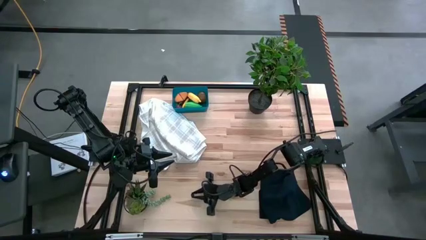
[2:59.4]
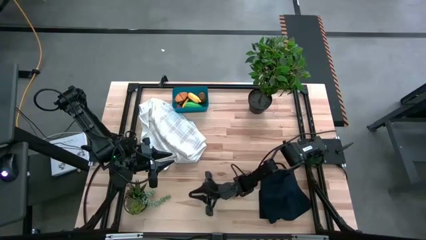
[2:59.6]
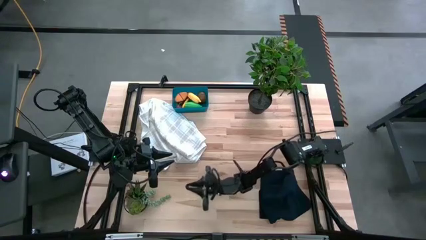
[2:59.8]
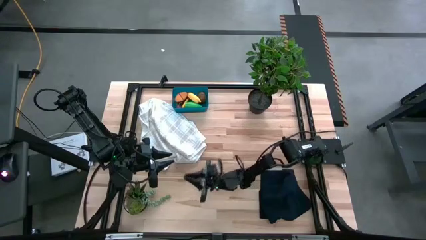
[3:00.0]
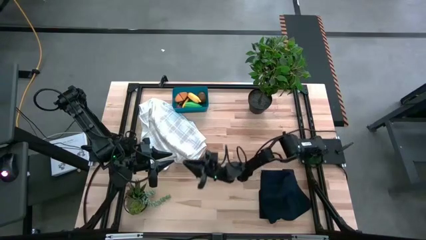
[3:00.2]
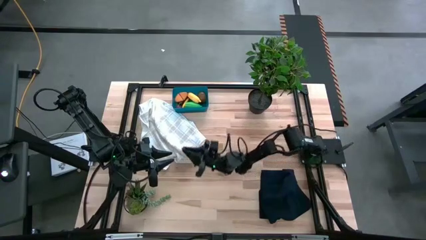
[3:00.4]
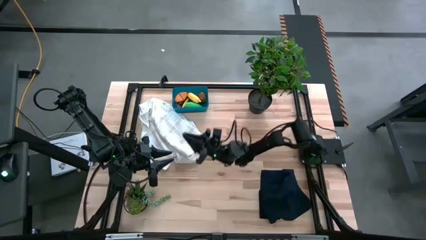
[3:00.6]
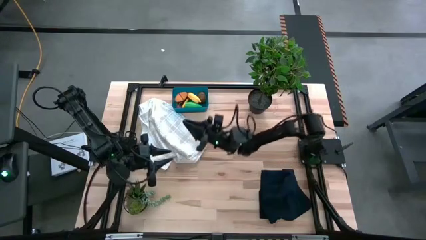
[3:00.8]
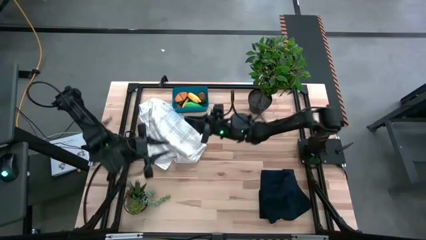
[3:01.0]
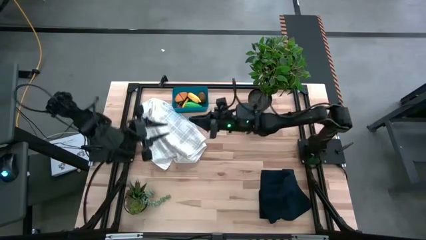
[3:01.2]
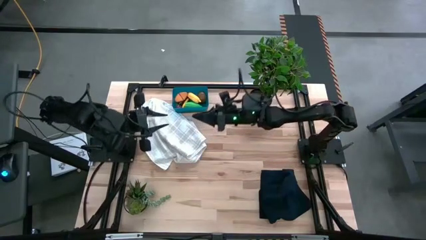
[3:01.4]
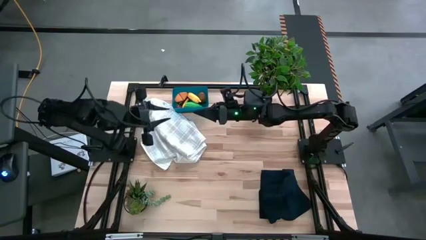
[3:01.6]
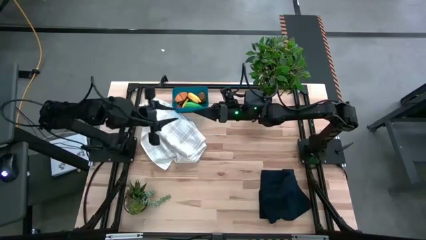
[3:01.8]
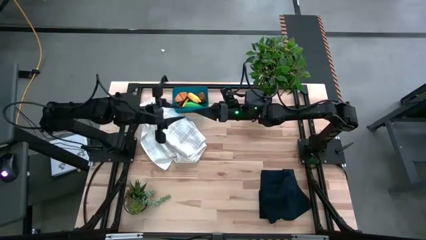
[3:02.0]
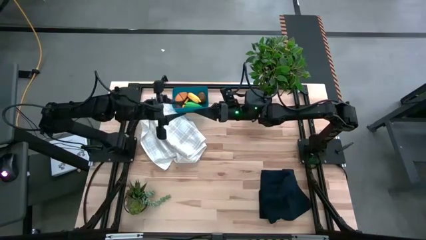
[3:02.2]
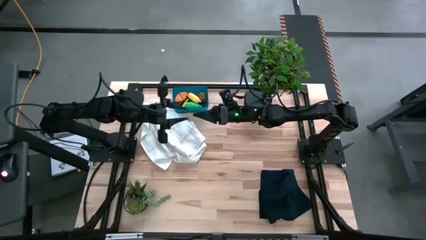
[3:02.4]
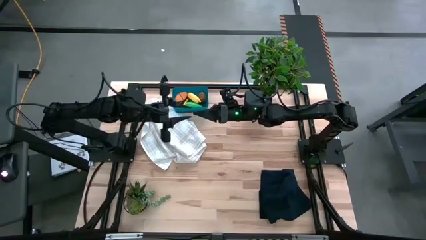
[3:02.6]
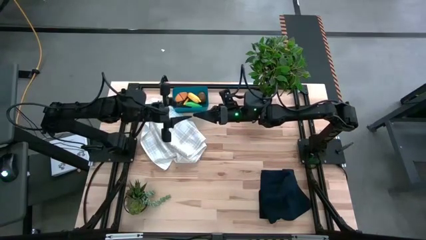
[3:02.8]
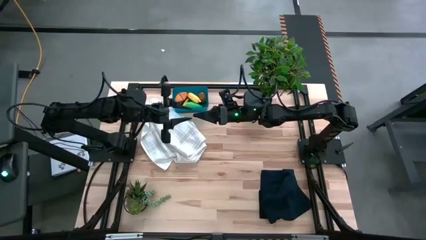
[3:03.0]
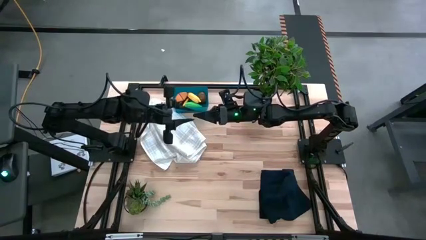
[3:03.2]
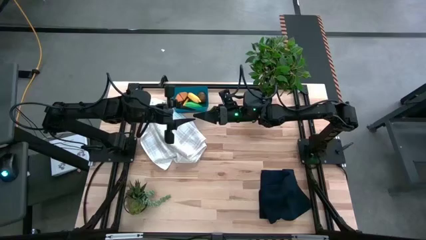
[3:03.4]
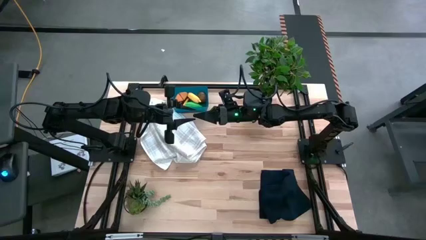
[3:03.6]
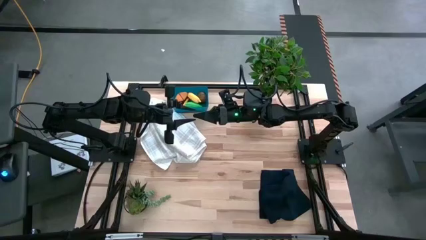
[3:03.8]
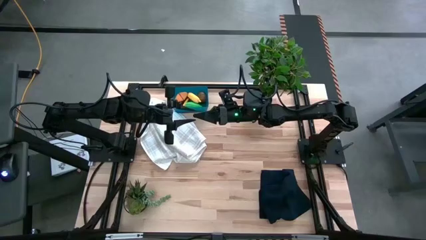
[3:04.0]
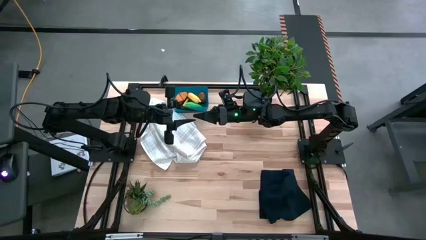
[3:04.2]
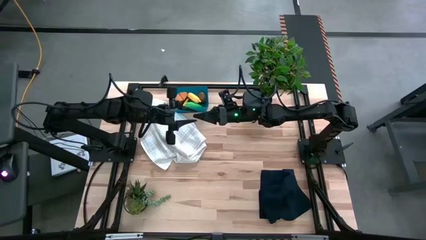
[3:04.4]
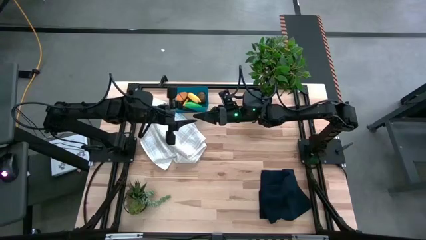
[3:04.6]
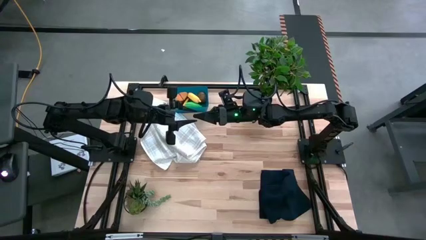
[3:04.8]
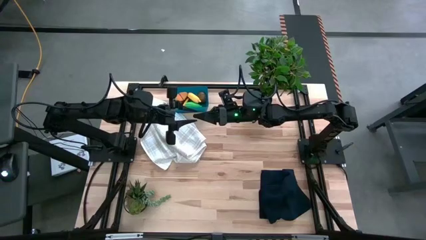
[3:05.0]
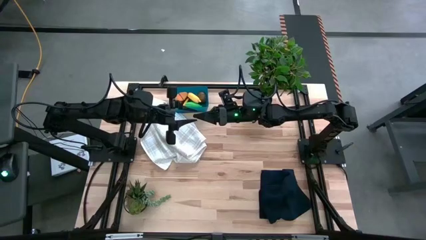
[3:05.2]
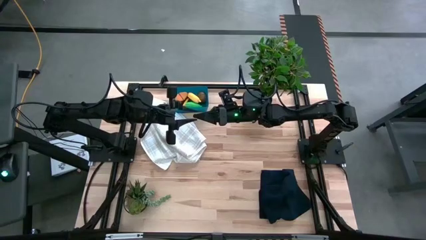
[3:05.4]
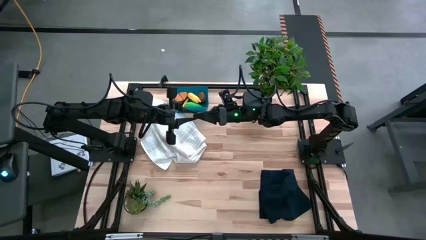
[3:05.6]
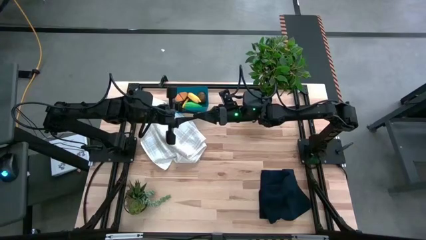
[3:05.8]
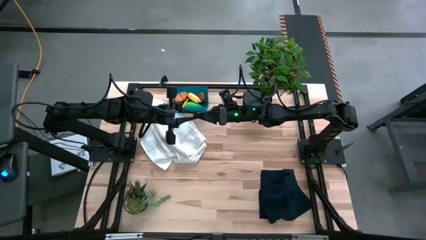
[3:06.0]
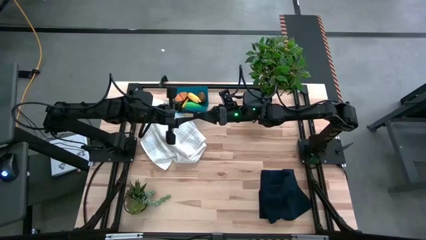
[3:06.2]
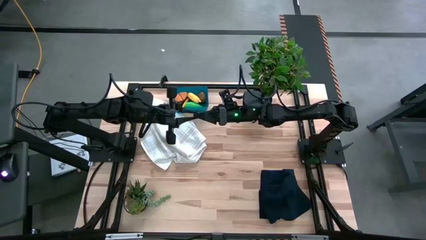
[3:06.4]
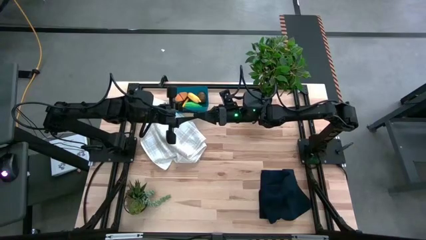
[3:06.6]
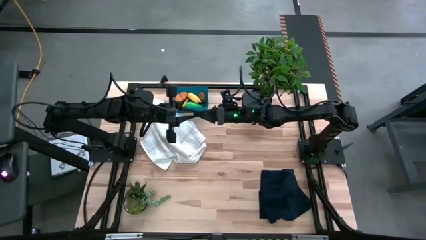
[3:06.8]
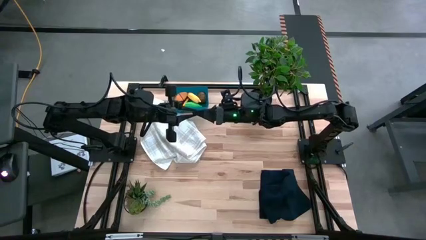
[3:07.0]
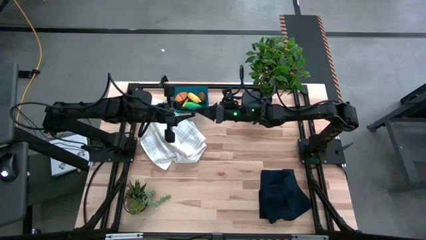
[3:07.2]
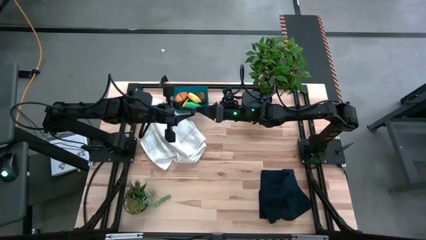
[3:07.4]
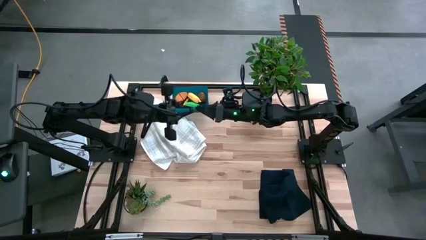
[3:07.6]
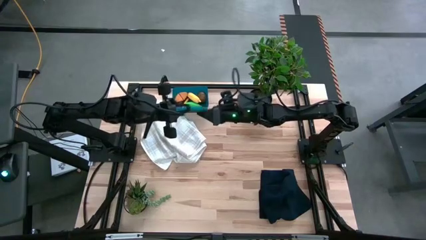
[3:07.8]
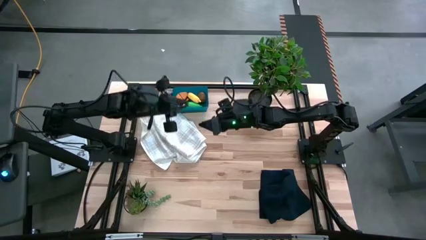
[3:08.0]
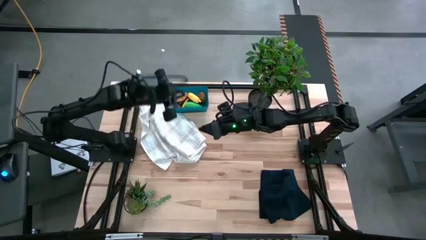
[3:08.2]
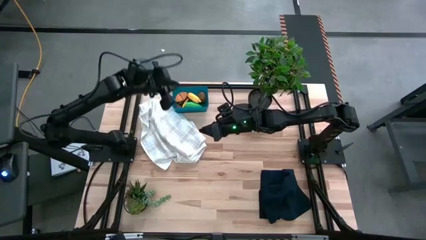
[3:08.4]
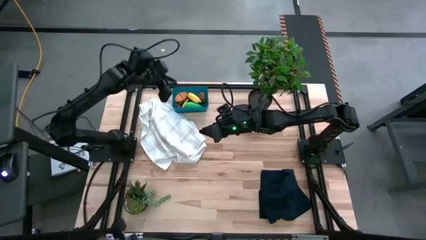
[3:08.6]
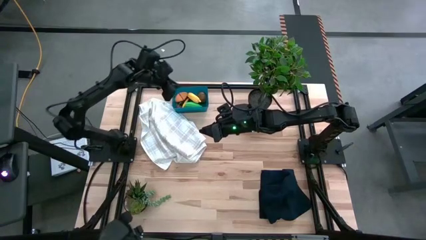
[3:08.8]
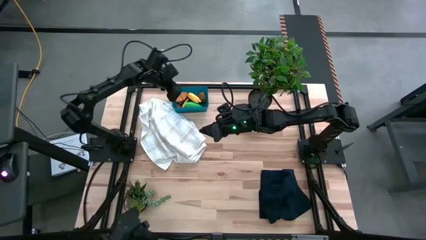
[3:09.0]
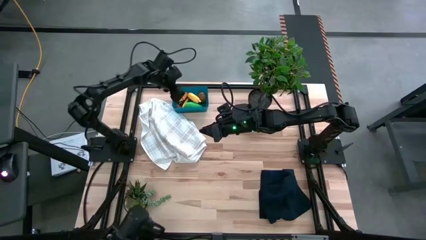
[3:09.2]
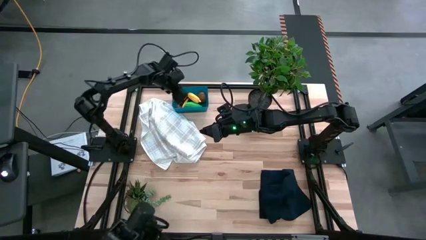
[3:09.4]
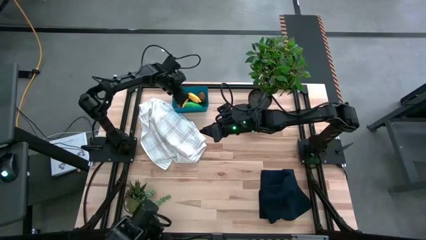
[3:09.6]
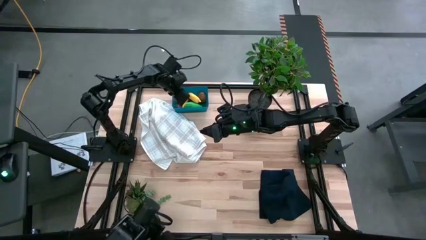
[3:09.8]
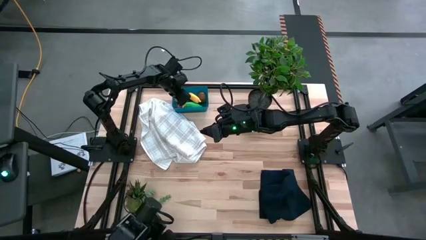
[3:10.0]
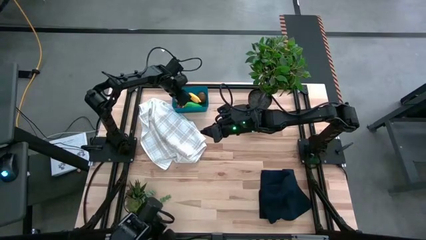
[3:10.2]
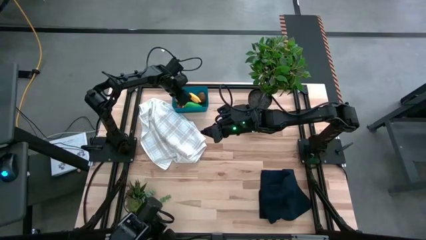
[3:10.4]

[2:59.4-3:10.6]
Task: Pick and placing Produce into tupperware
Put the blackberry into the blue bin
